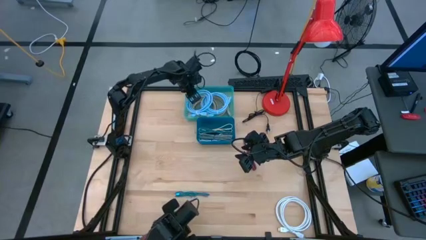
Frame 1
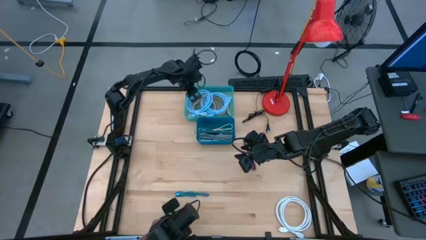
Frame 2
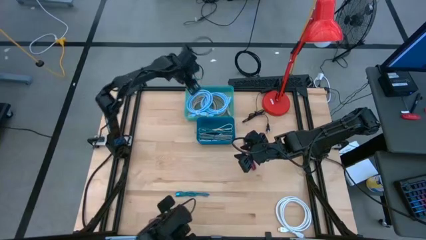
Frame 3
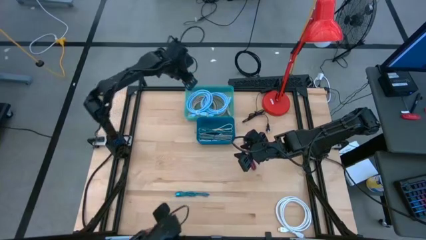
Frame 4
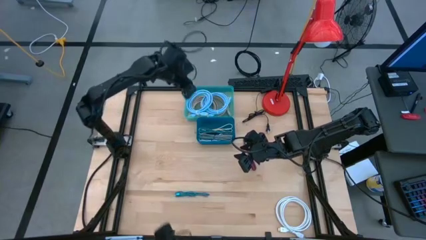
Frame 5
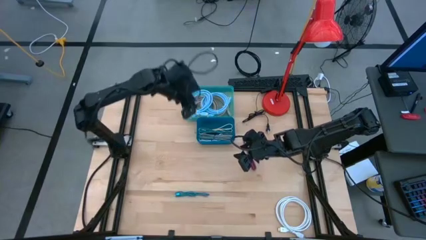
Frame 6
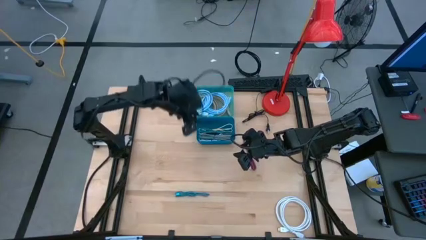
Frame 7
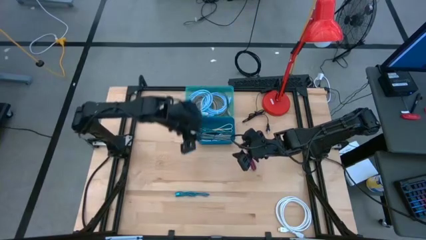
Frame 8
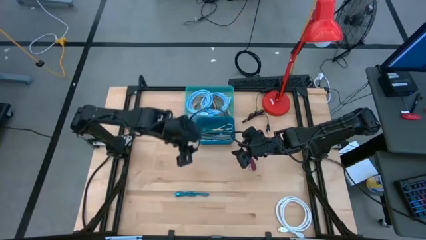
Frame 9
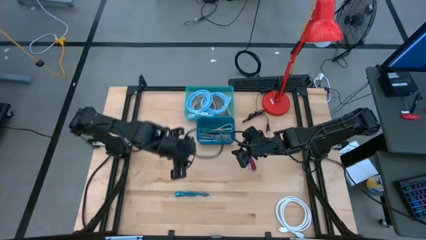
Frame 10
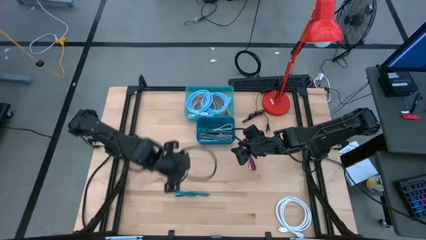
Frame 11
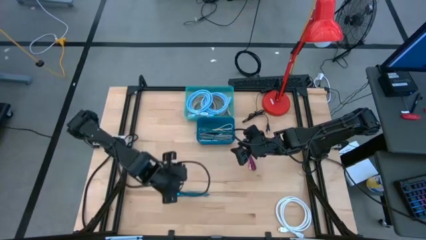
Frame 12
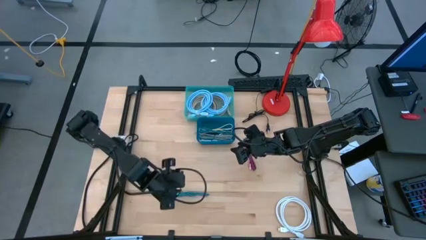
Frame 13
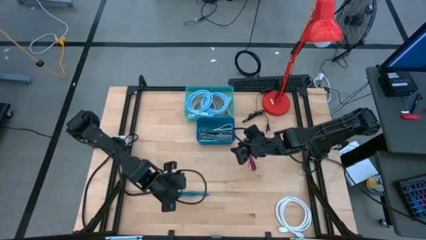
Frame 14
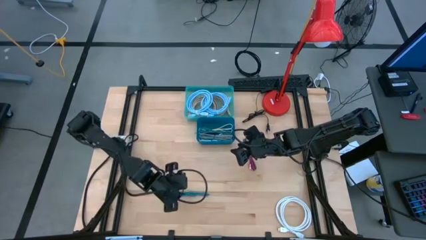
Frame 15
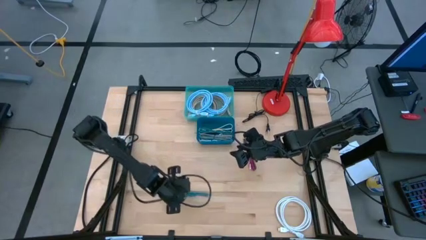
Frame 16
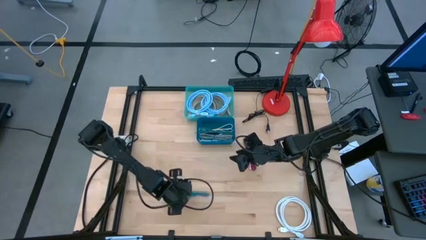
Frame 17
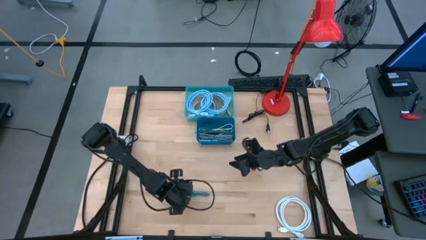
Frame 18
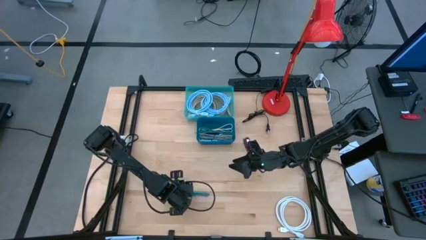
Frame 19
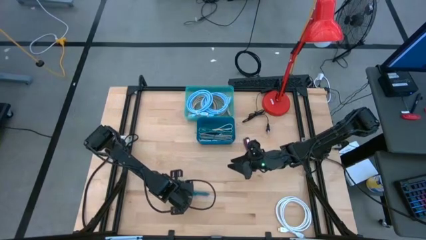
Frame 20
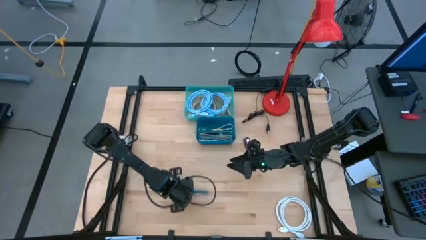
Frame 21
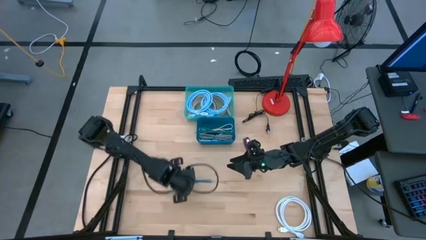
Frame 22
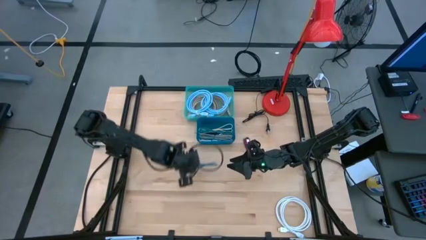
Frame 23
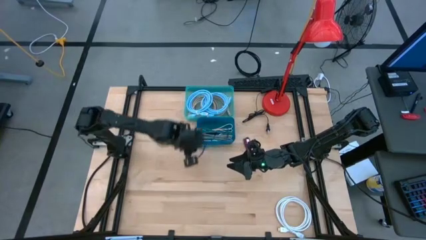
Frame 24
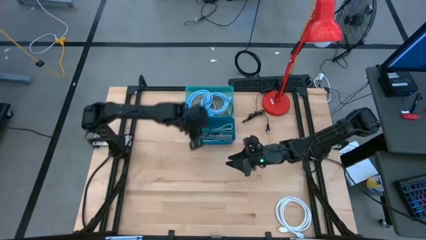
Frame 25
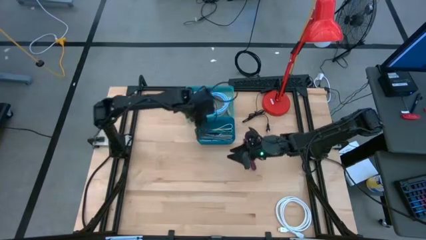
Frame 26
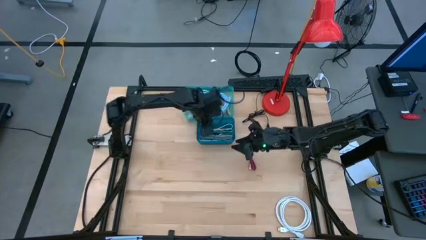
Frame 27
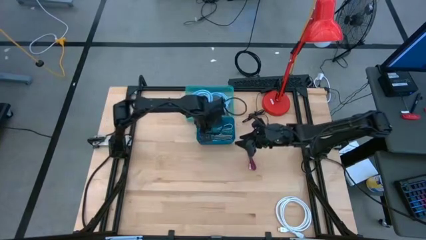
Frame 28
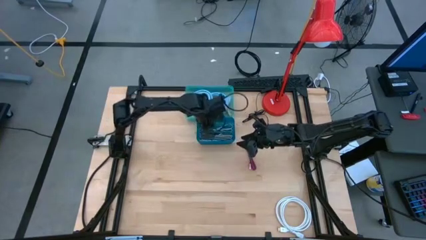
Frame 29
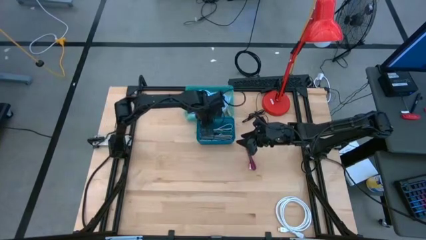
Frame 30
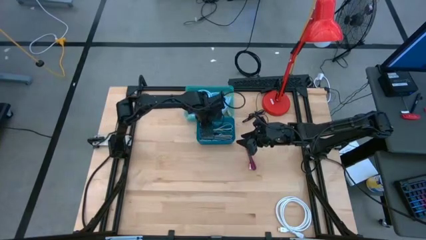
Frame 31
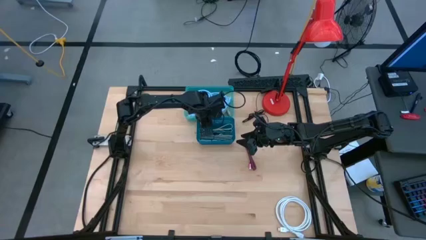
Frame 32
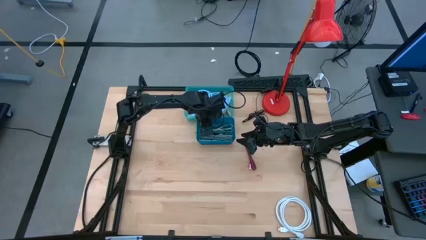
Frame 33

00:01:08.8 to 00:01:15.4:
Task: Pick & Place USB Port
Put the blue charger cable into the blue bin

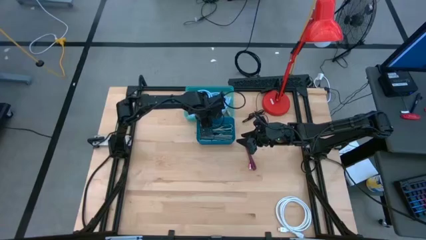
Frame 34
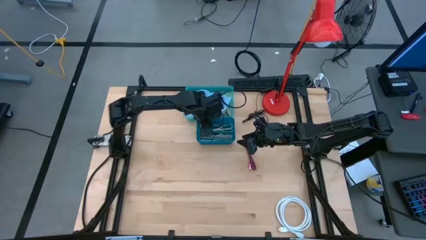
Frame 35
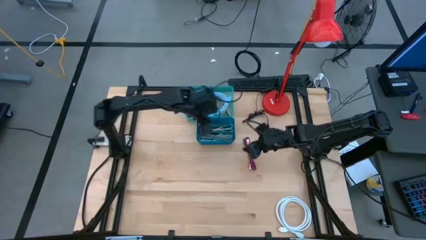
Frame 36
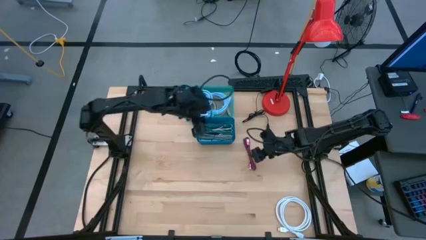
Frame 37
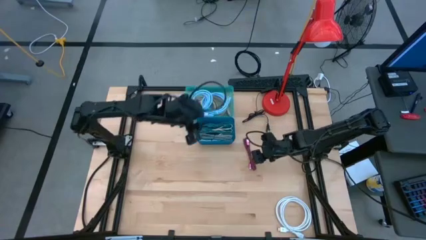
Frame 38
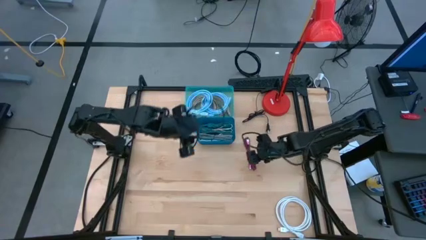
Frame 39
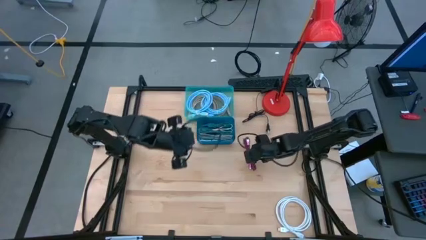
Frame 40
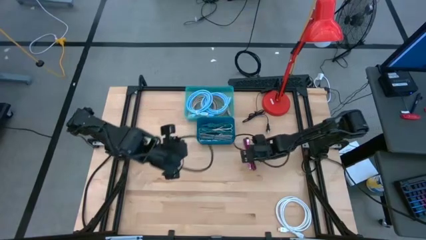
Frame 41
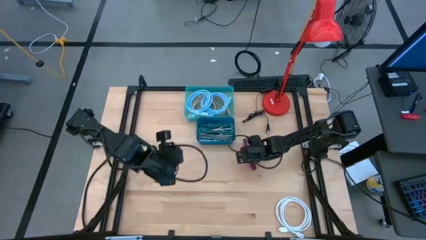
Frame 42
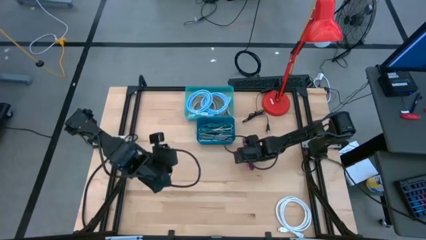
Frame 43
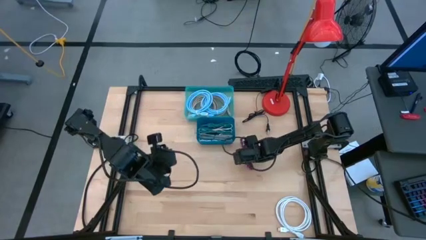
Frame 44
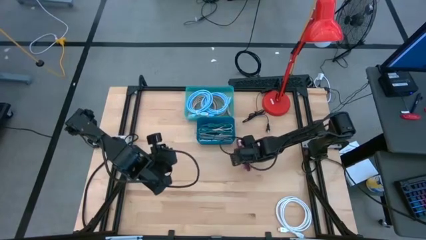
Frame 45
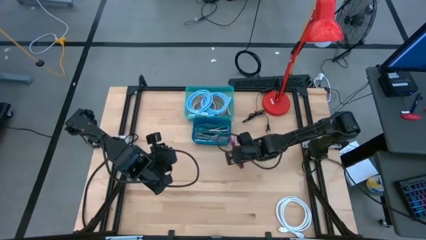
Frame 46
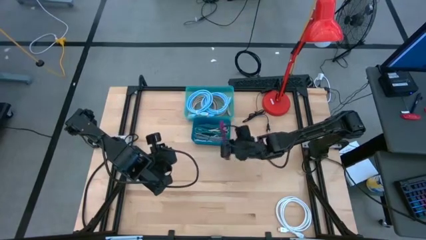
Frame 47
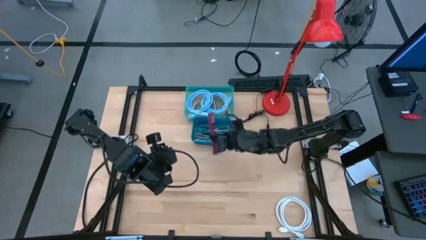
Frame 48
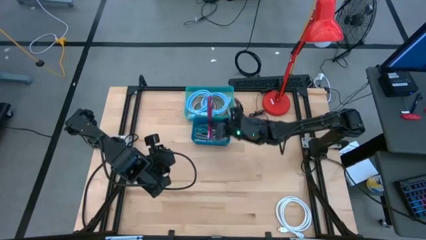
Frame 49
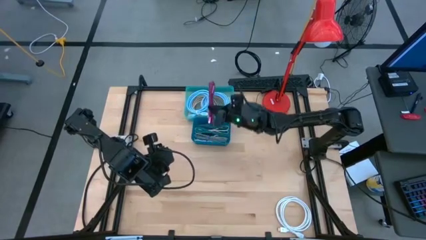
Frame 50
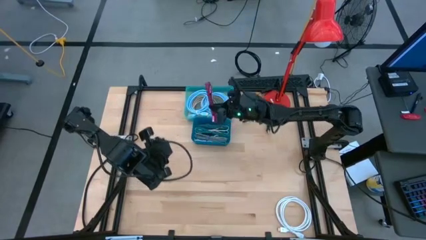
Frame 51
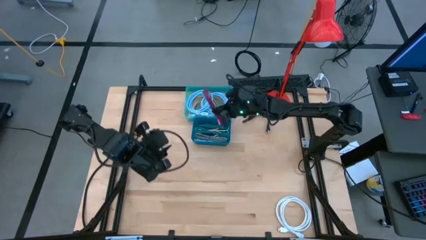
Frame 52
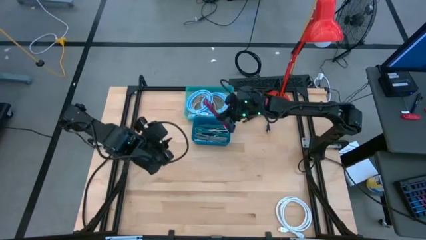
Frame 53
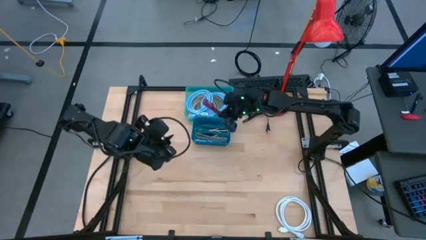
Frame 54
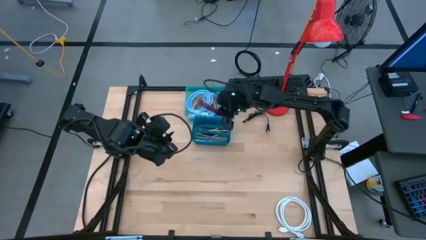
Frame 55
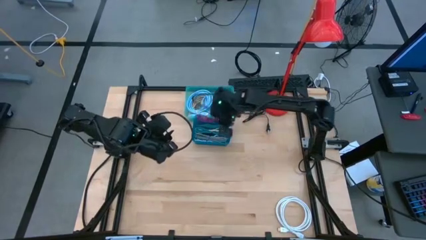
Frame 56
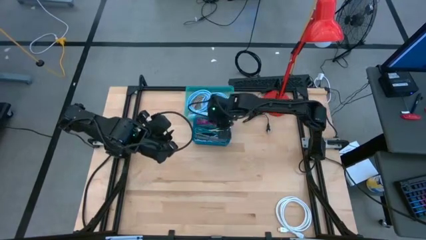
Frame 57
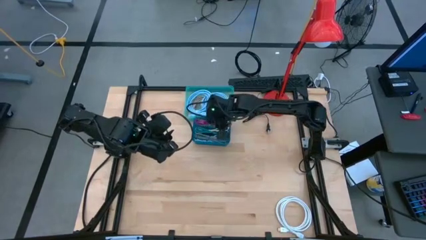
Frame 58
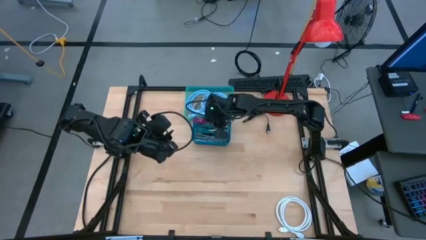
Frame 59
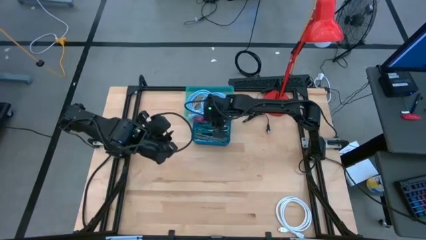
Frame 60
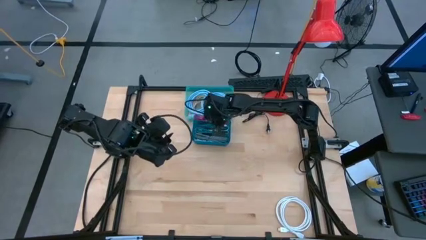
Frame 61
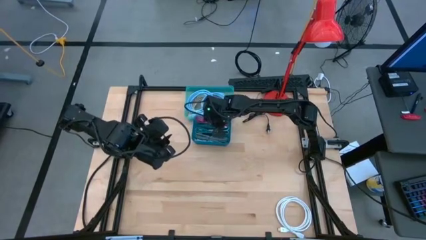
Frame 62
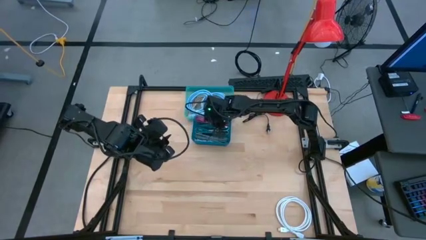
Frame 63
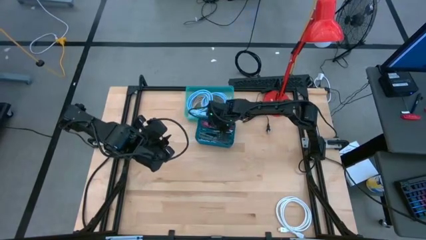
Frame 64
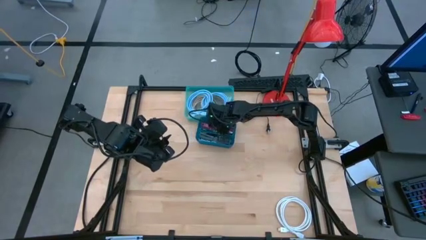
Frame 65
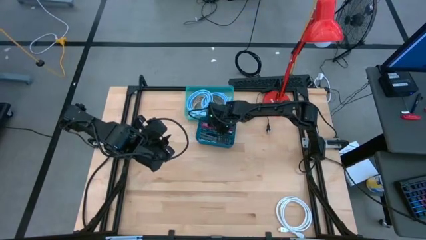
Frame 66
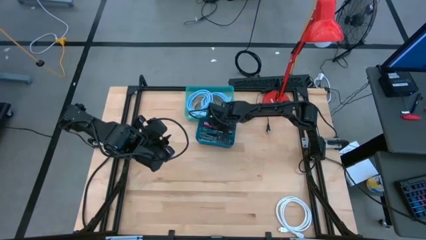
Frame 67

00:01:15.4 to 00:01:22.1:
Put the pink charger cable into the blue bin

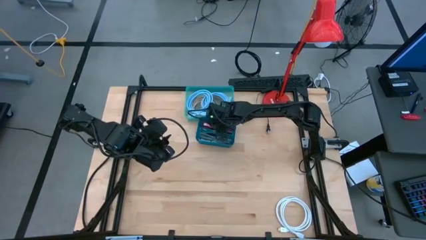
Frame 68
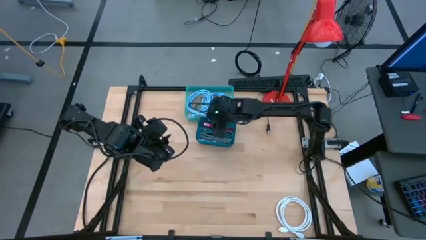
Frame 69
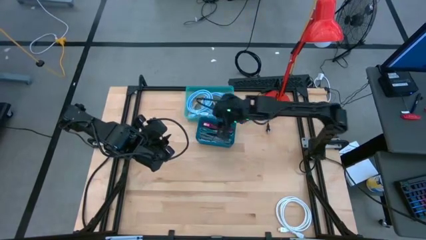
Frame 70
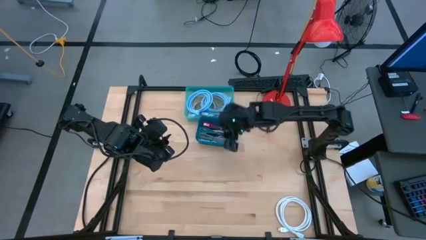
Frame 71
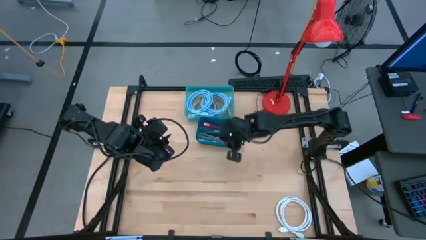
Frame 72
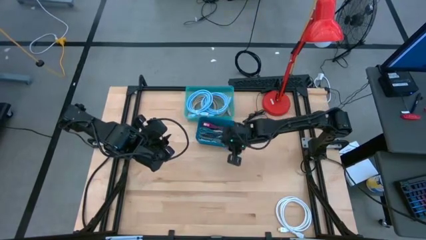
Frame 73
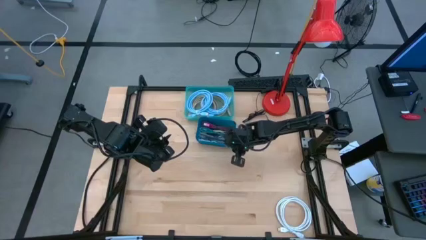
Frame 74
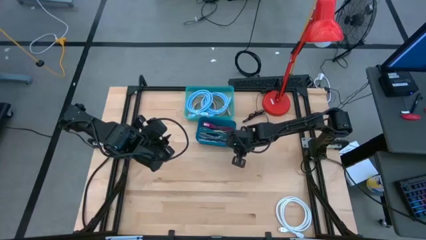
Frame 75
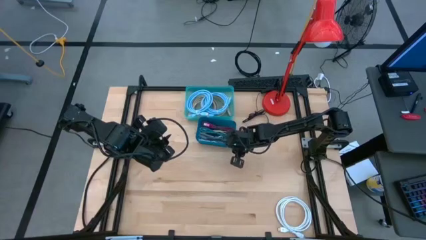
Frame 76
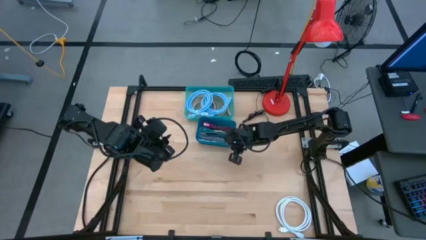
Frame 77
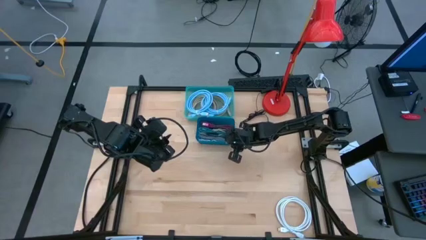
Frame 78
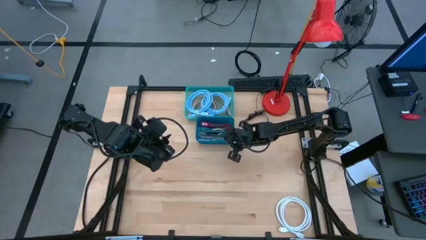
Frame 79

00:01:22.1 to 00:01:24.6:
Adjust the blue bin on the table
